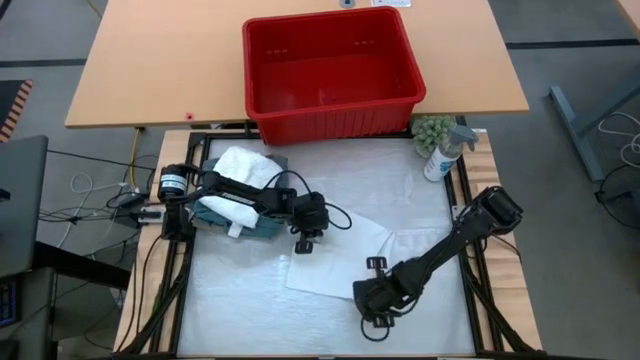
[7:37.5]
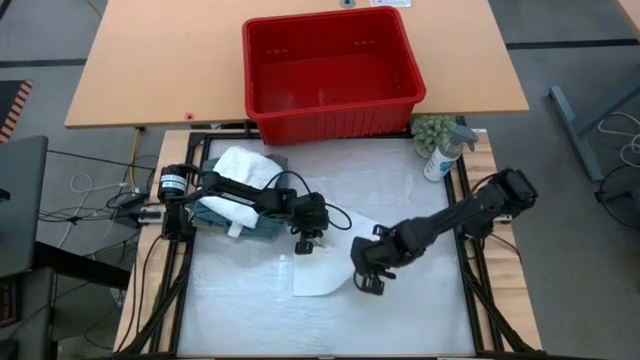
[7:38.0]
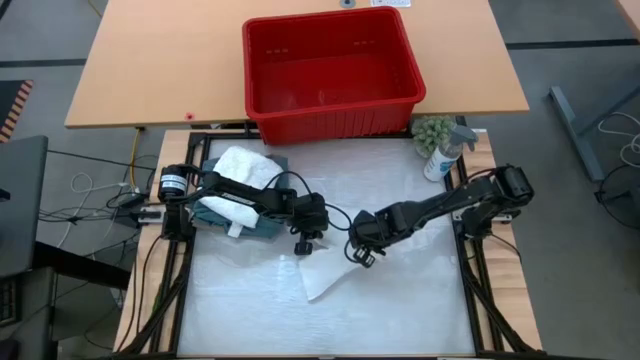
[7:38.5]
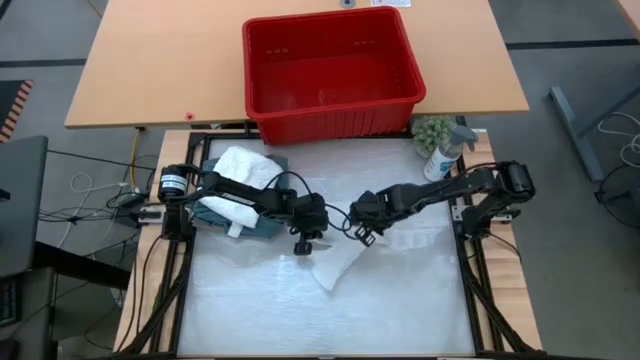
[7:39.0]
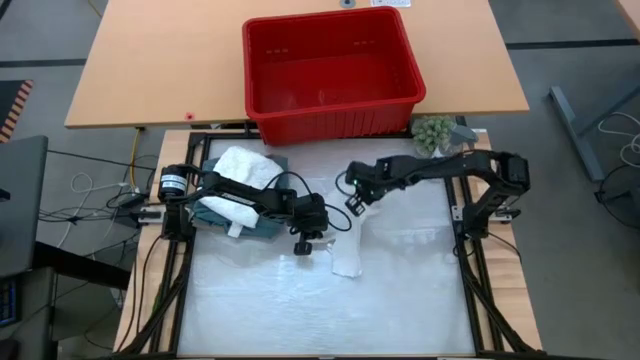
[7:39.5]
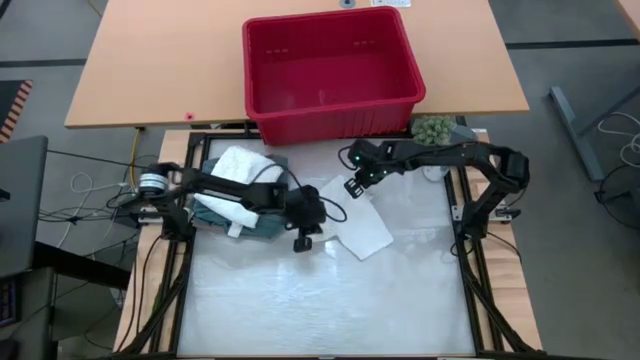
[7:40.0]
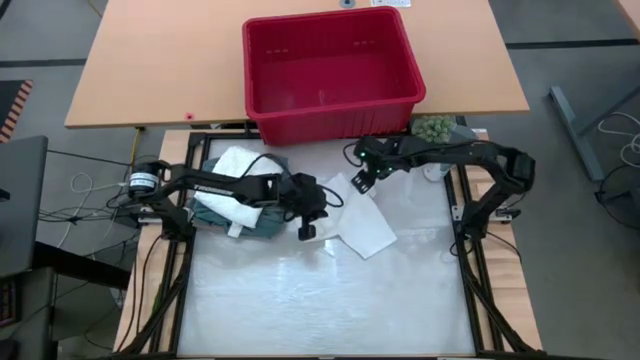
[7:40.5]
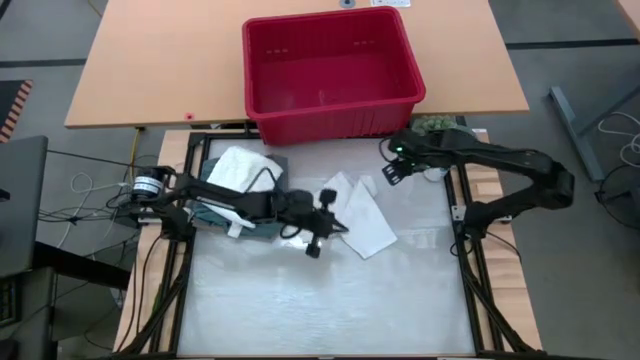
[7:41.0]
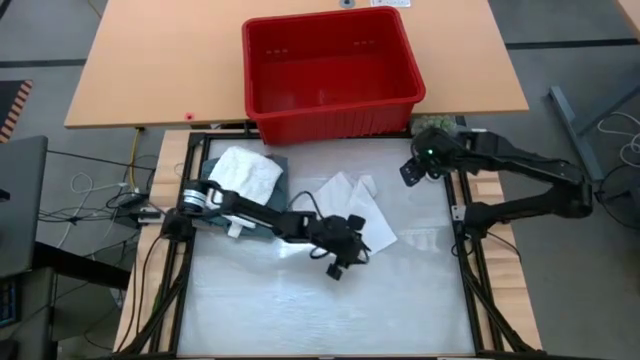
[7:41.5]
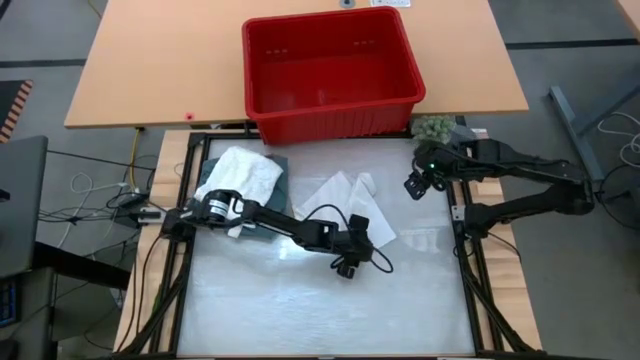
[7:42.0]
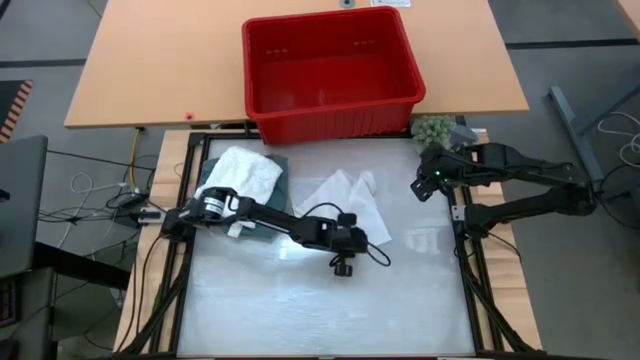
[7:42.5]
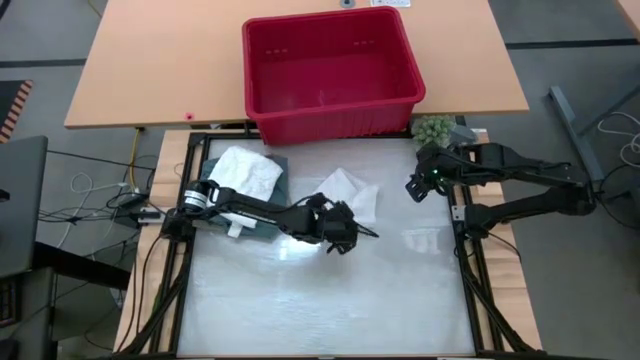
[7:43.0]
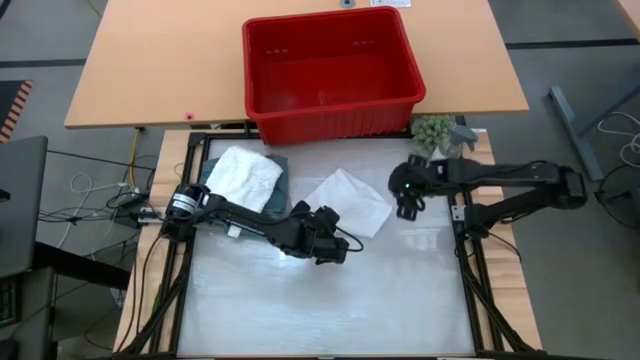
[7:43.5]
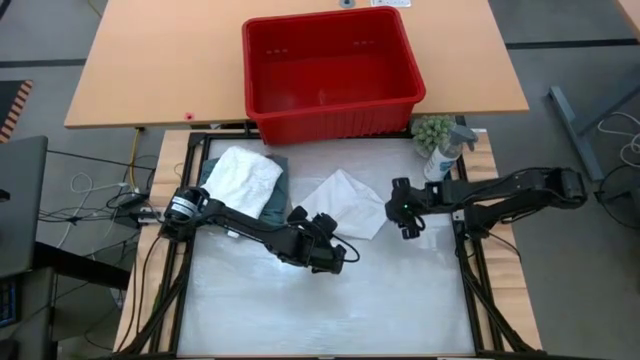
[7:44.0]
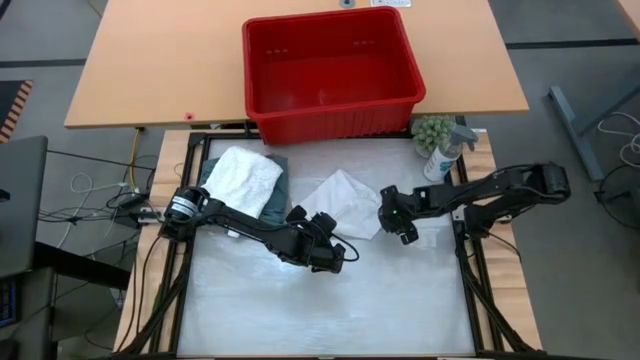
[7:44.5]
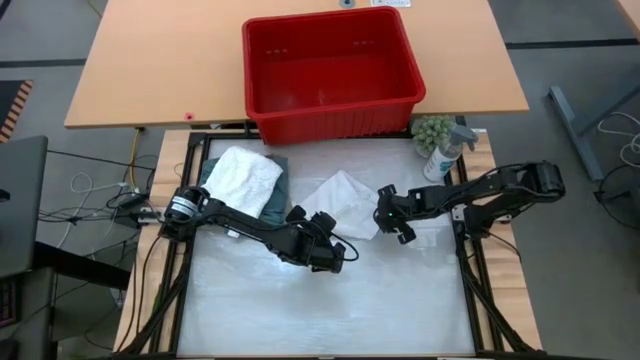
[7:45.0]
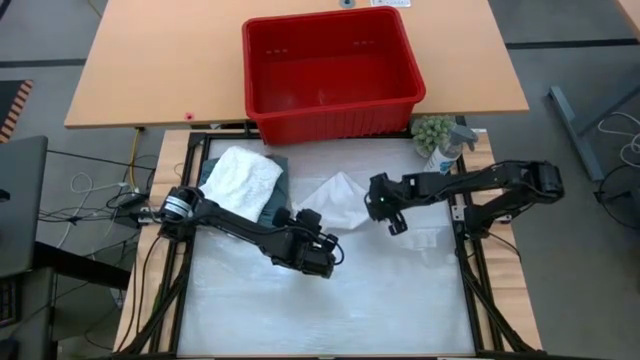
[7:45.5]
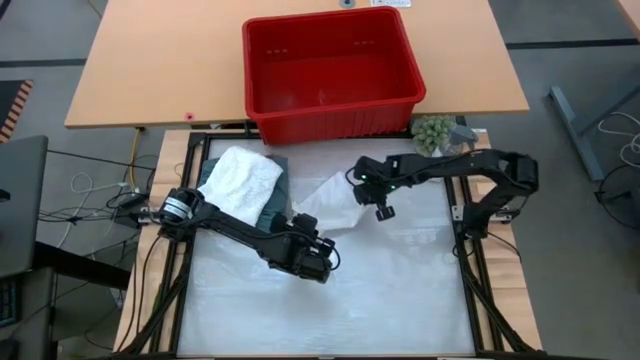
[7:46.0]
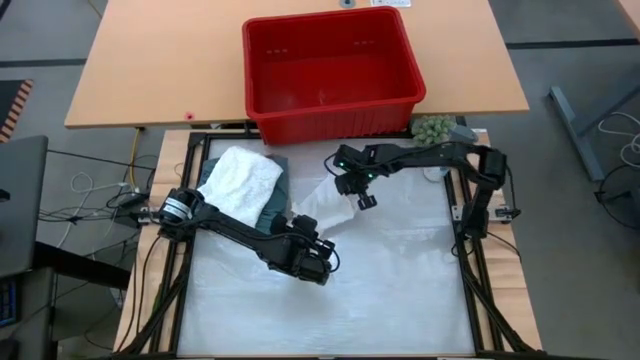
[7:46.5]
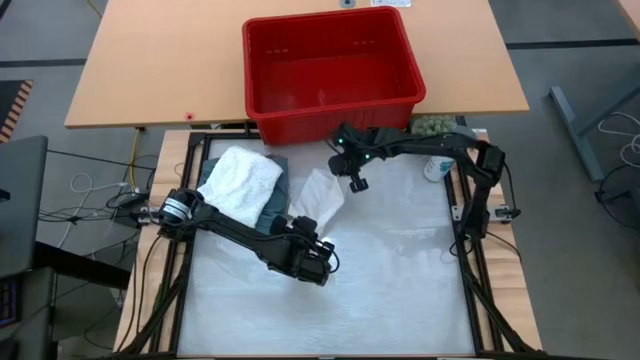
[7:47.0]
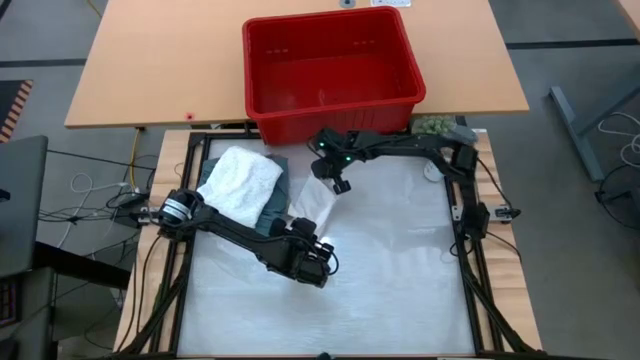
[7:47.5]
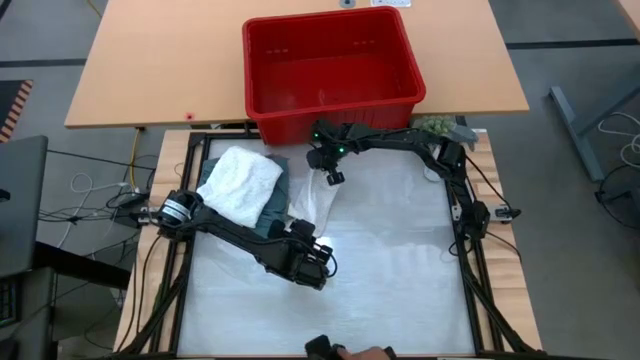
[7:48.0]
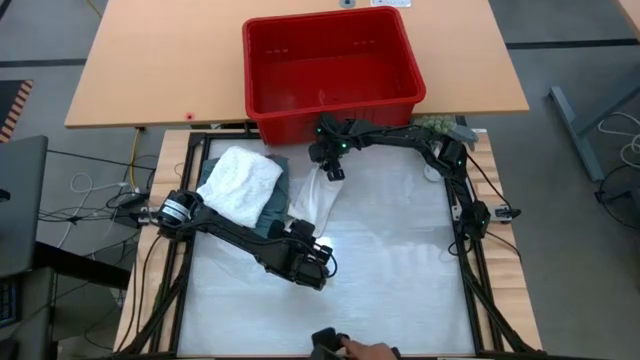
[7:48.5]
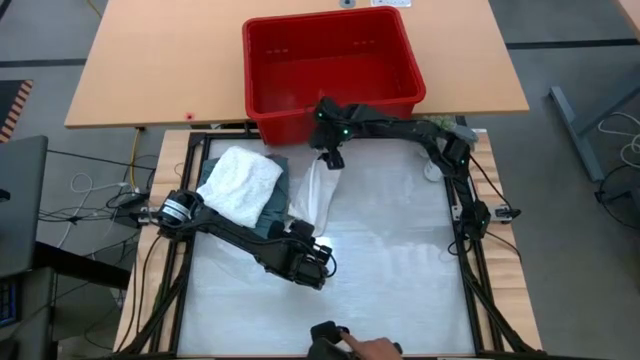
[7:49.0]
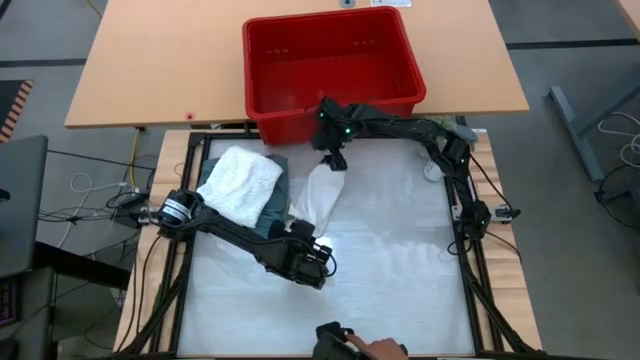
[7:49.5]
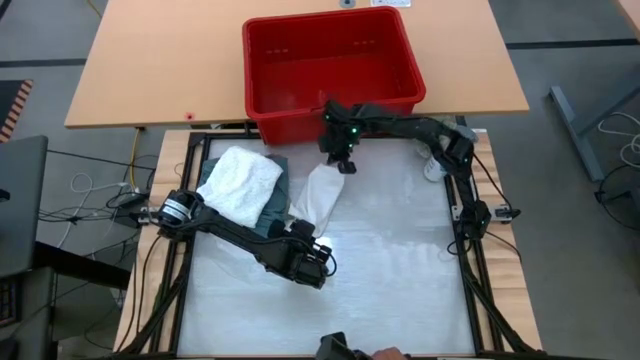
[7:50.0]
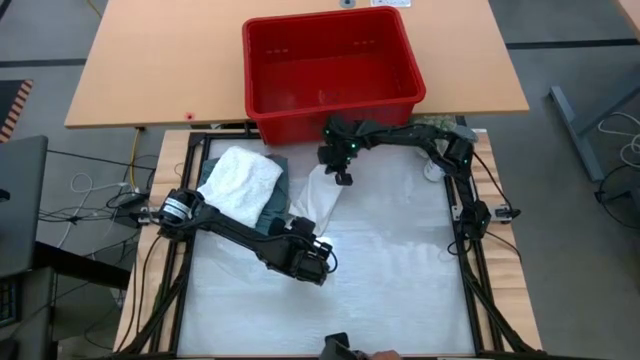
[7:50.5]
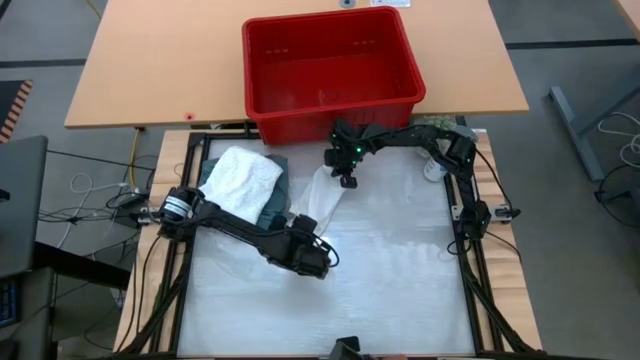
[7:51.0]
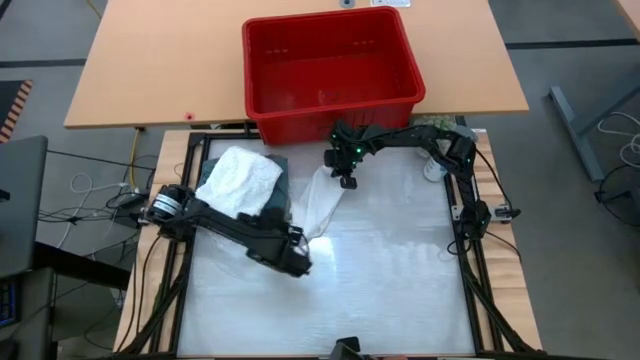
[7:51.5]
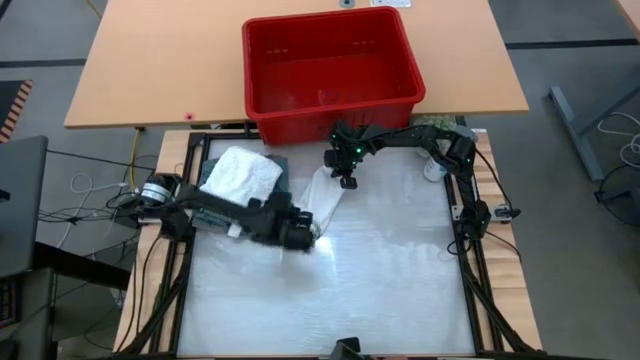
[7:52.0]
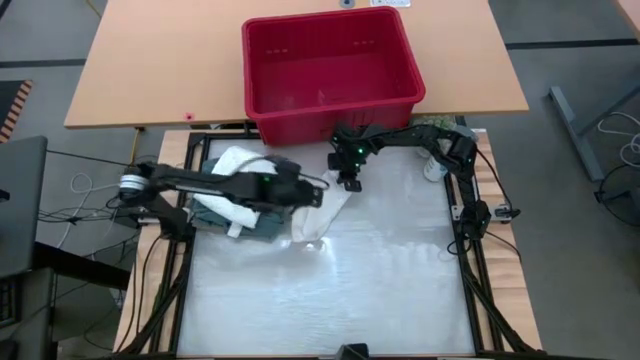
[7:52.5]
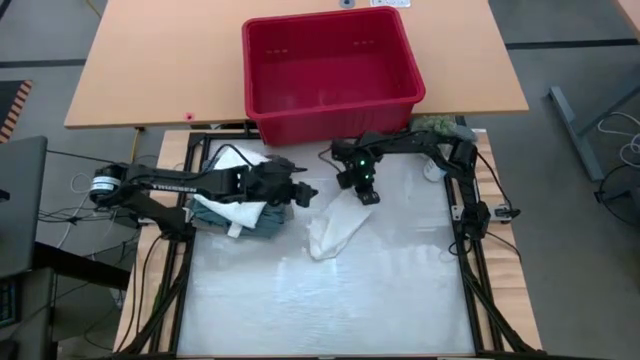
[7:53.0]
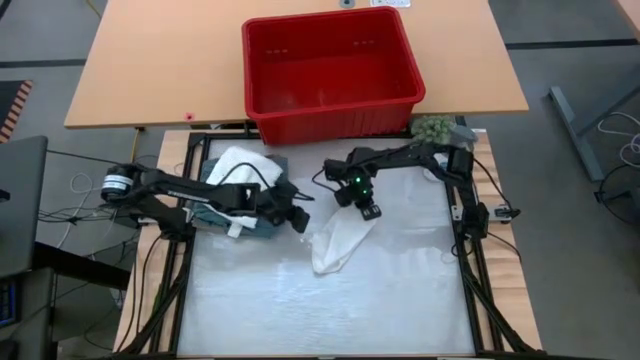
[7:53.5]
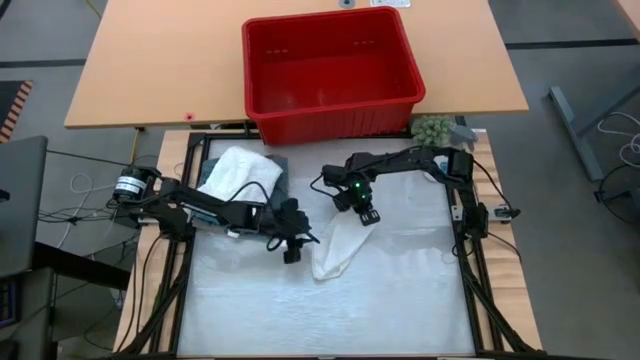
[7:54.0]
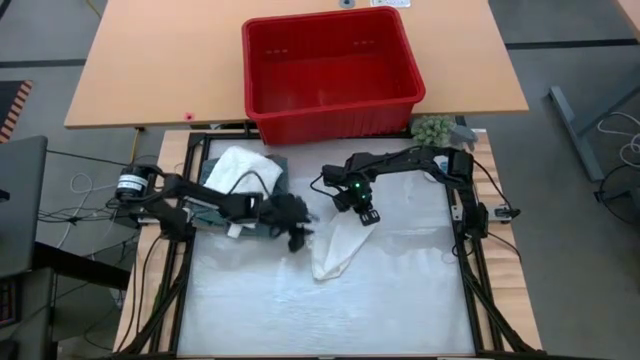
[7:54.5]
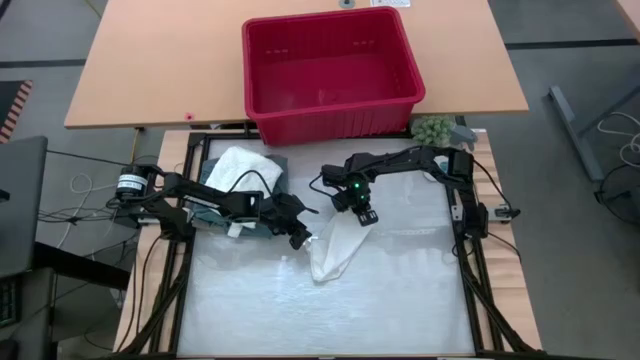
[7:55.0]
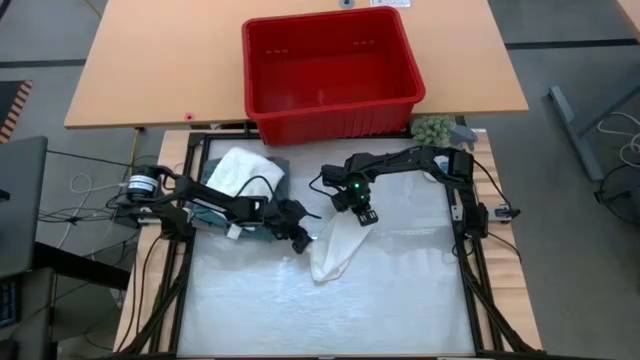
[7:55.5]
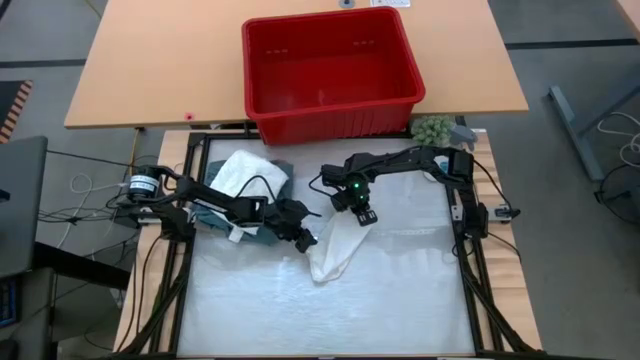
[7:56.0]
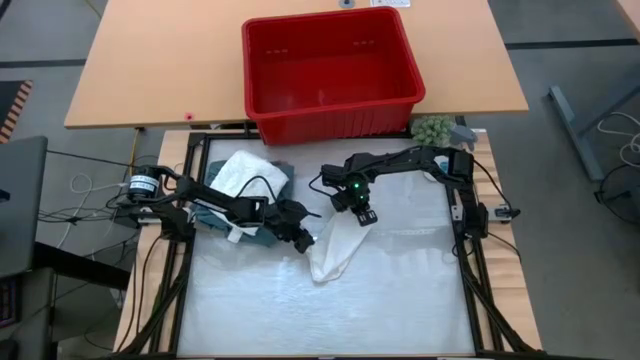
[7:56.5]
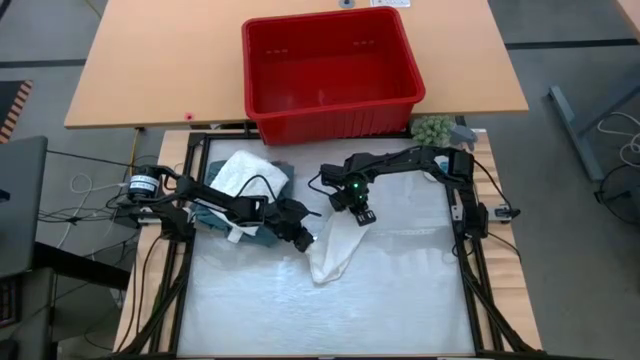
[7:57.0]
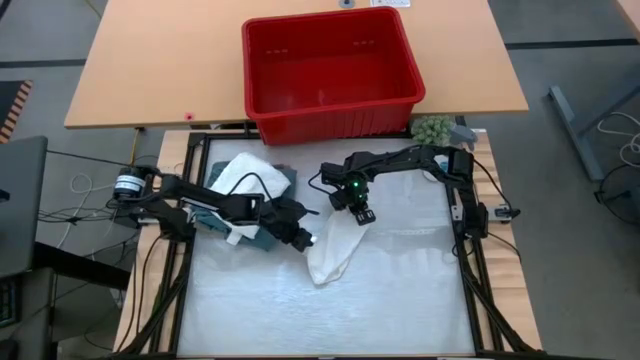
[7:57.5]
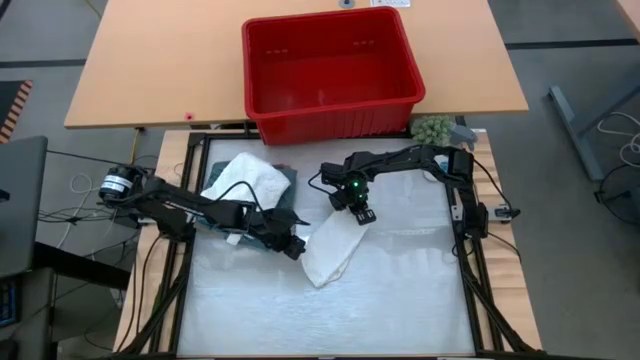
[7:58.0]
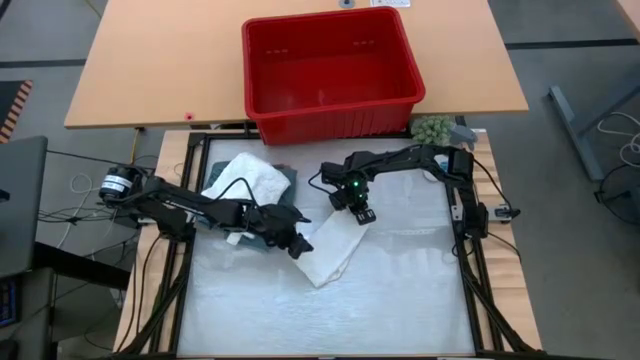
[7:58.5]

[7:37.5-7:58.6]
Task: Fold Laundry from Bin
Fold the white underwear in the red bin
